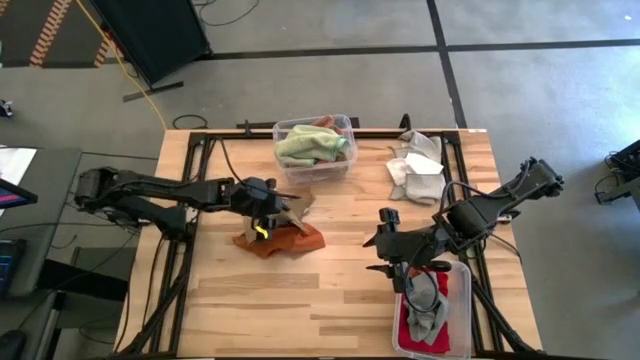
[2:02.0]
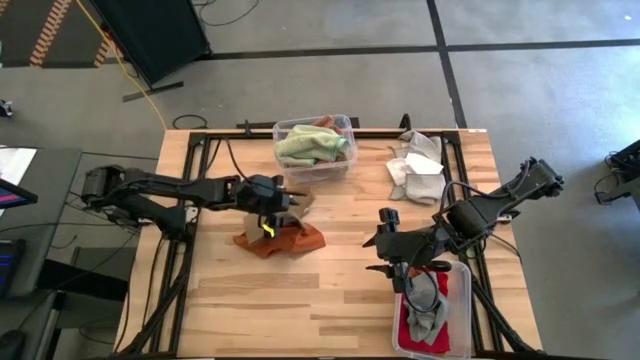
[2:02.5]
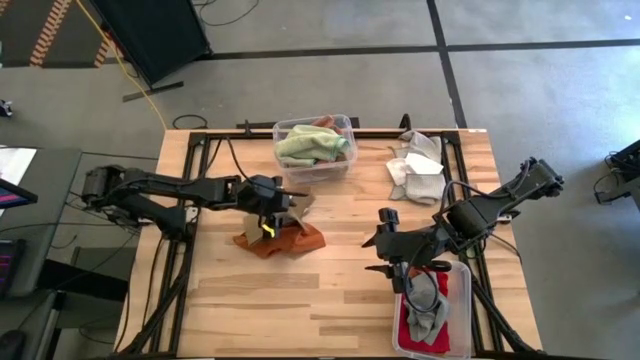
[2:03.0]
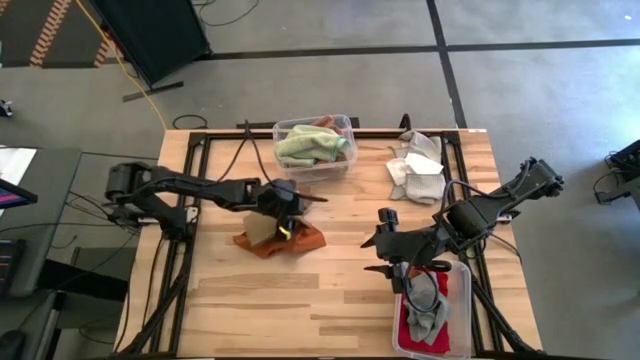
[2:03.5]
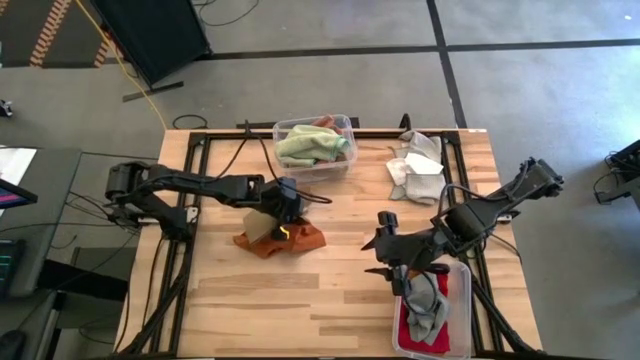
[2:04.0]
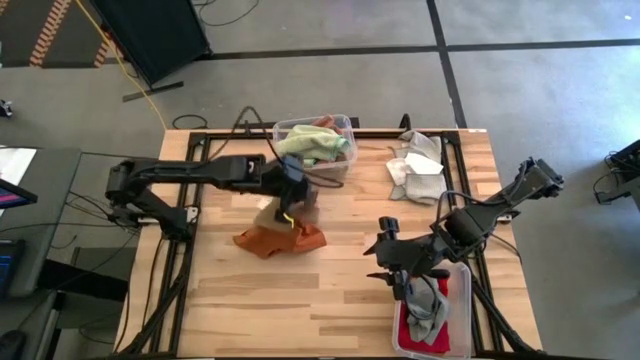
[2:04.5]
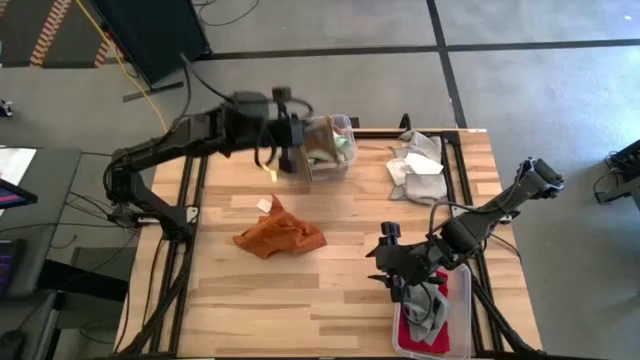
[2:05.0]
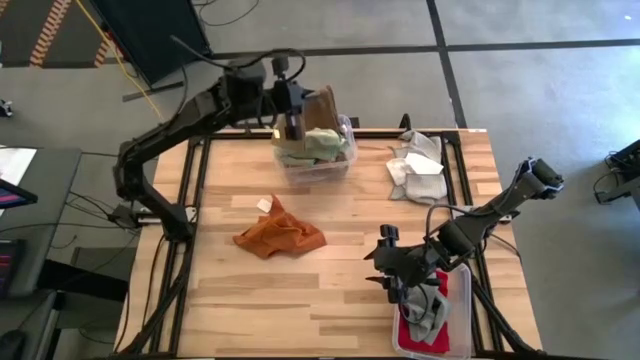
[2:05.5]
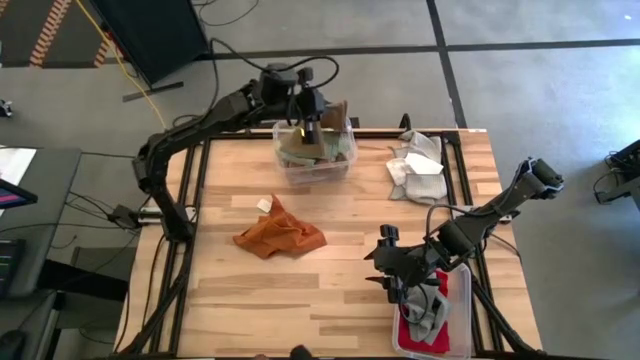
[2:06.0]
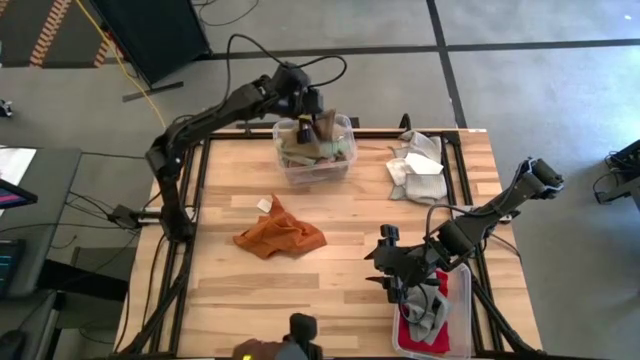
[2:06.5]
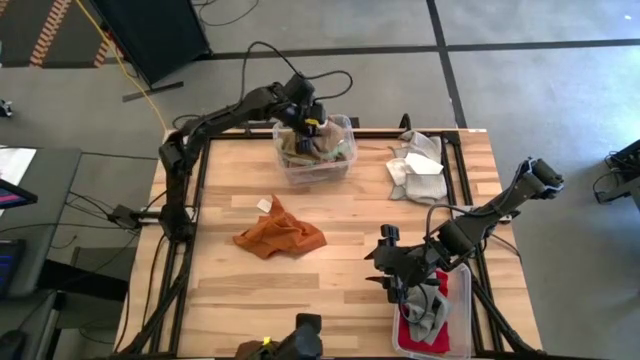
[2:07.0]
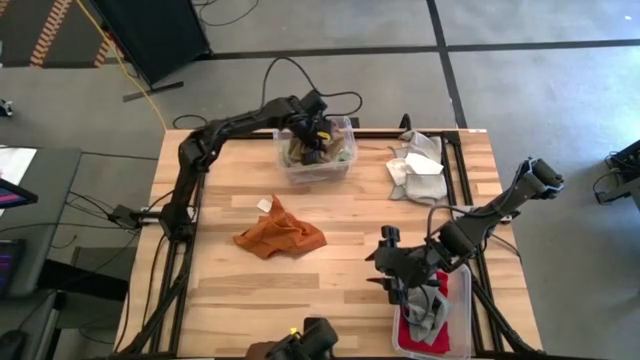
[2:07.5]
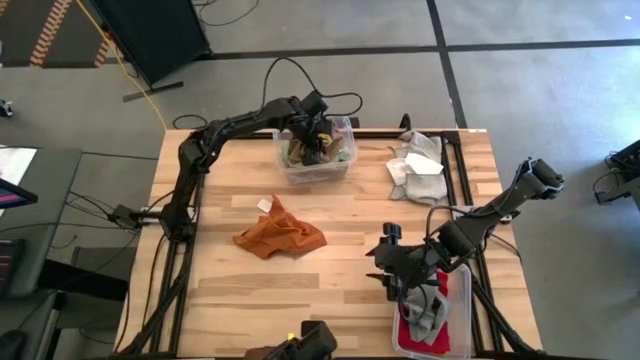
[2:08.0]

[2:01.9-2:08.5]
Task: Sort towels by color in basket
Put the brown towel into the top transparent bin

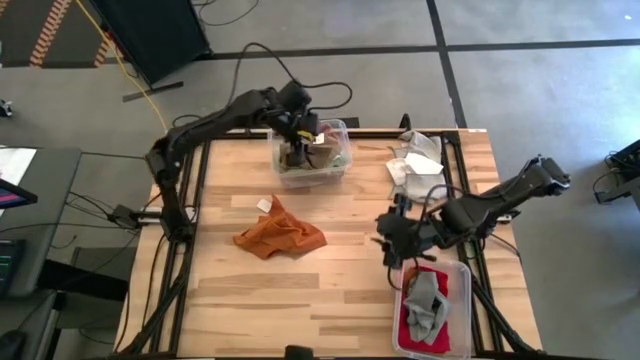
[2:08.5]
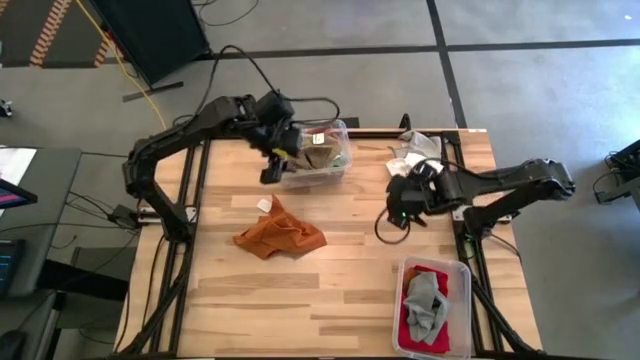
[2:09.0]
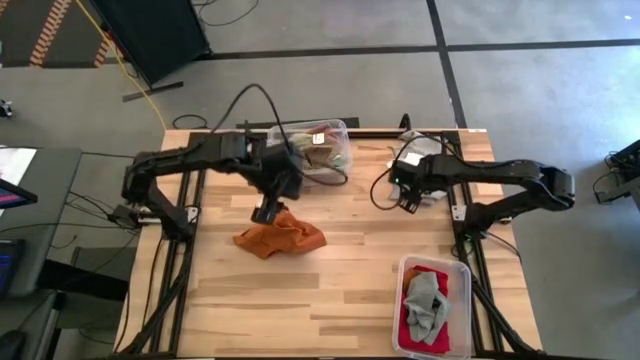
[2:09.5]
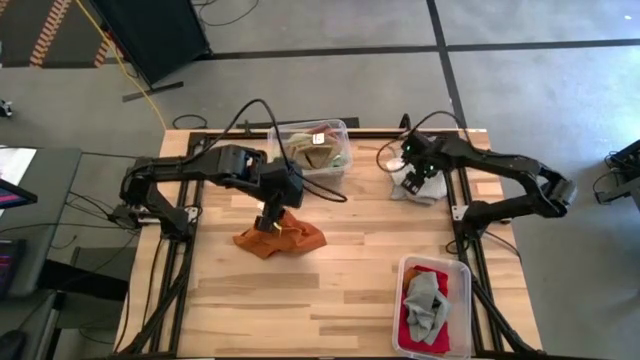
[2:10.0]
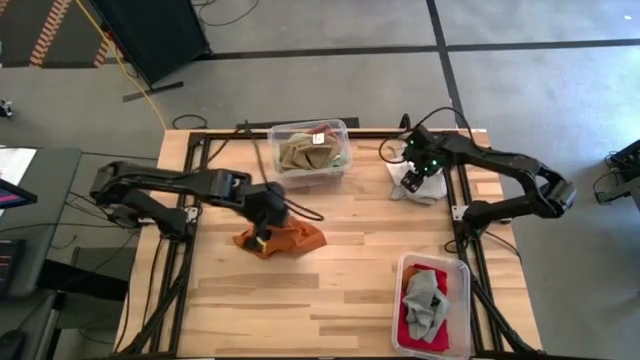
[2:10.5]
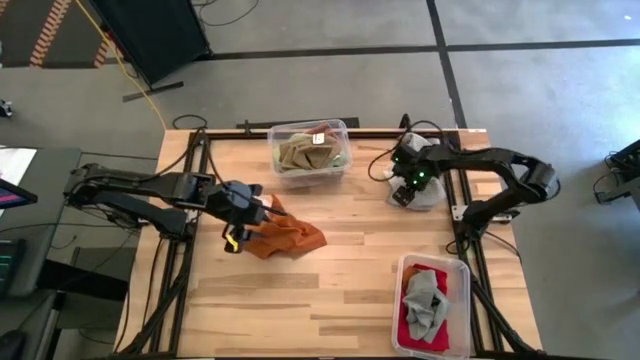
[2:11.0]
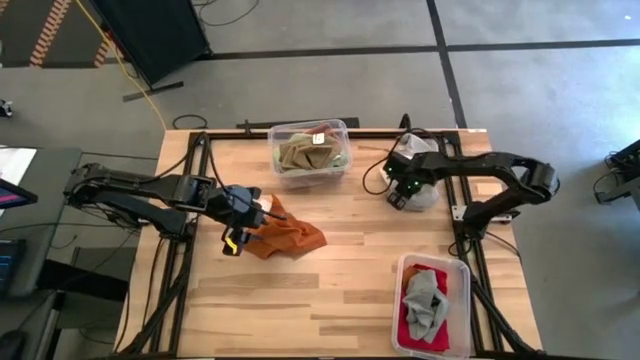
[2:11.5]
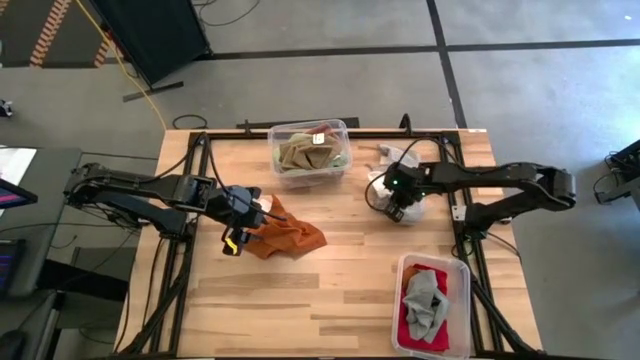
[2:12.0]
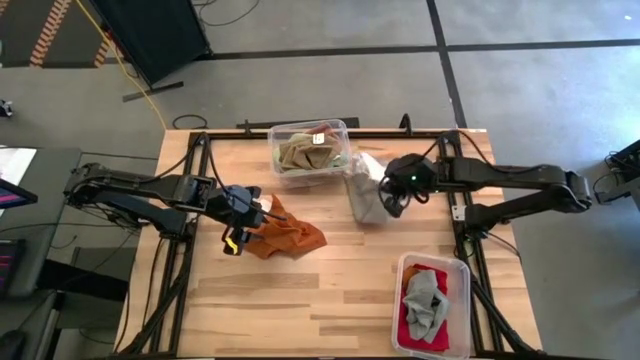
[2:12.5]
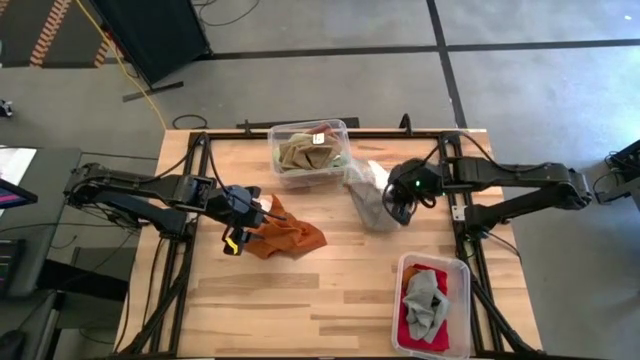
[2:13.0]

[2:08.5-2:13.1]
Put the white towel into the top transparent bin

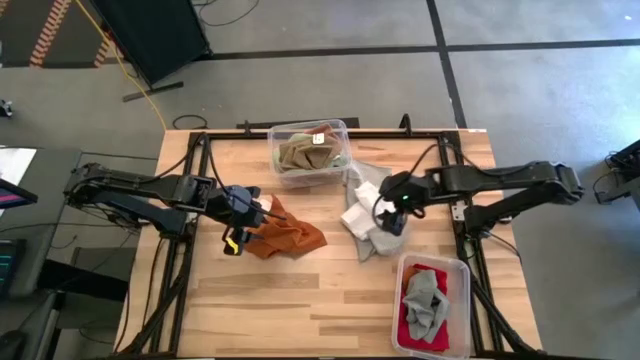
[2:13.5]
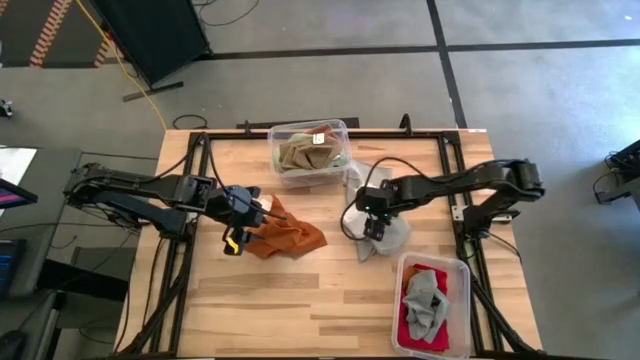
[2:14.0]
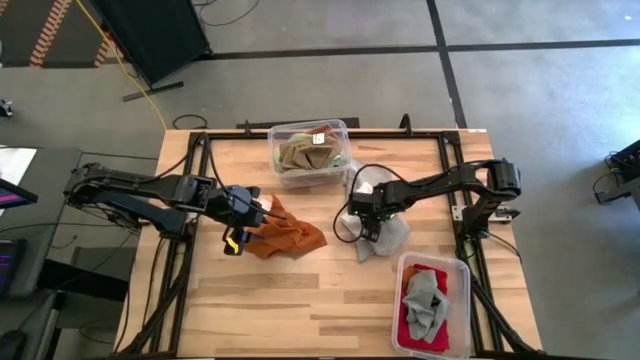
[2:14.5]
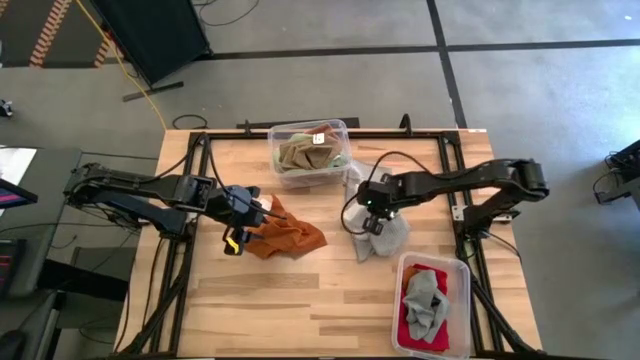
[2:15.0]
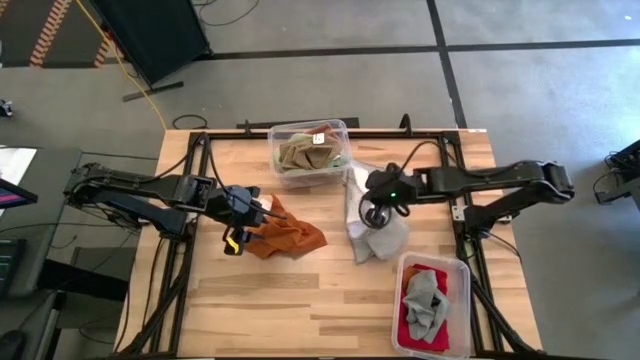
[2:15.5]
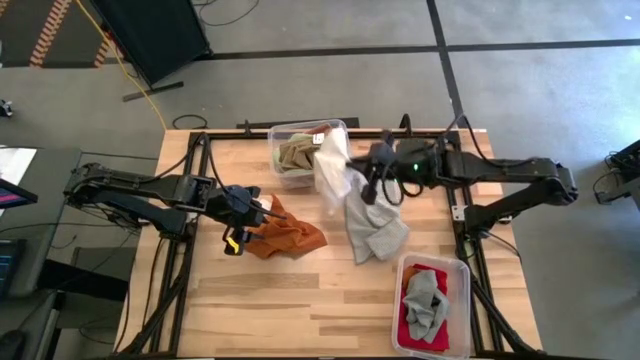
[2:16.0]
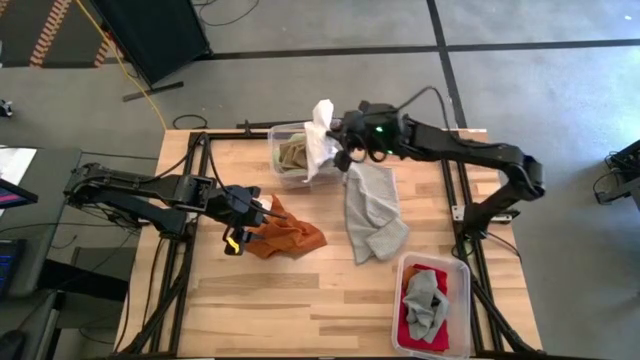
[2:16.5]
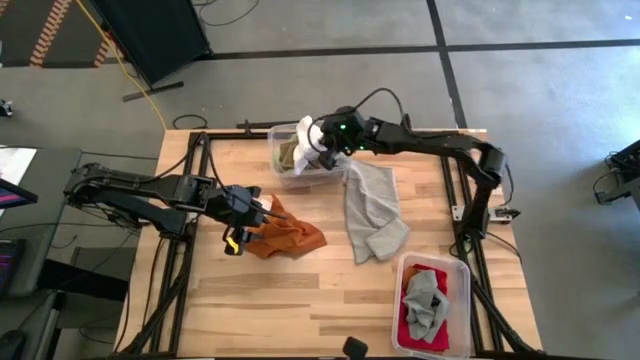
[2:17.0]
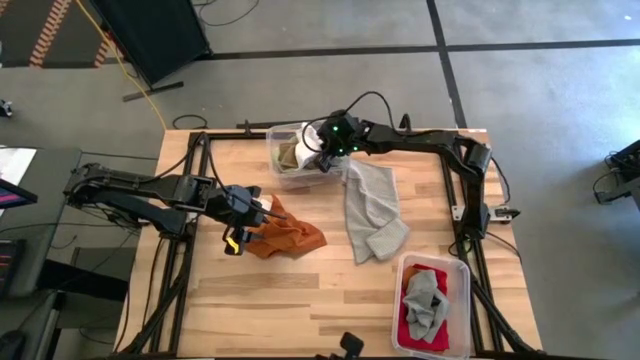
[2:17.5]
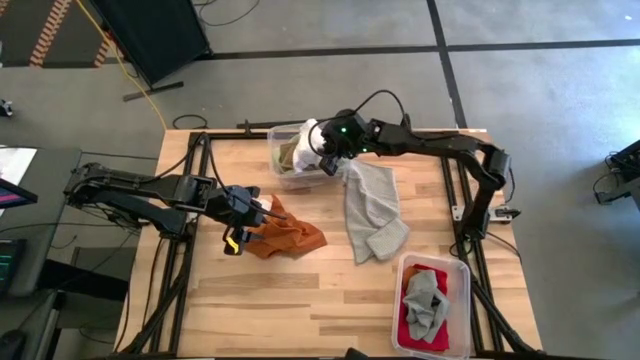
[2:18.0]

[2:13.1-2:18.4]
Put the white towel into the top transparent bin

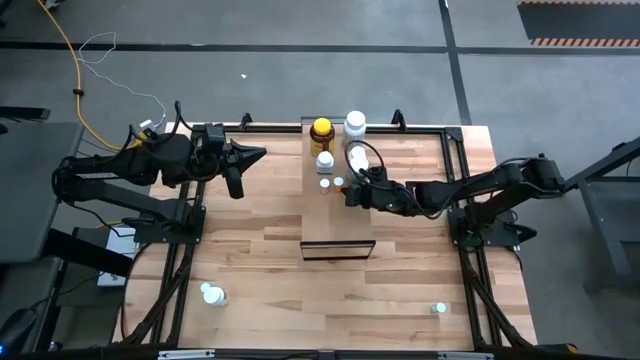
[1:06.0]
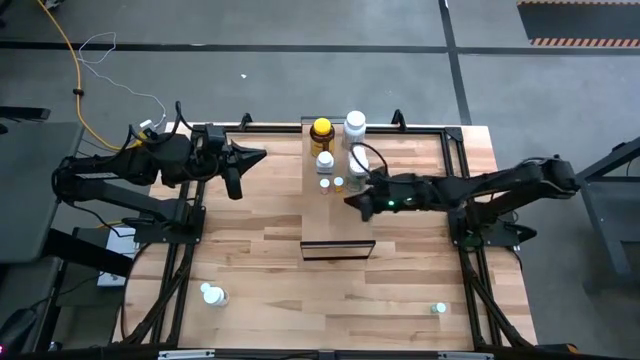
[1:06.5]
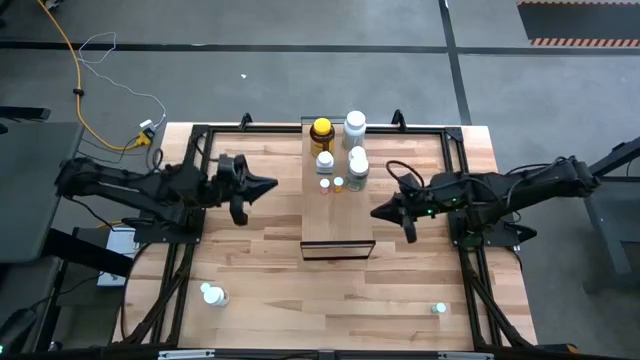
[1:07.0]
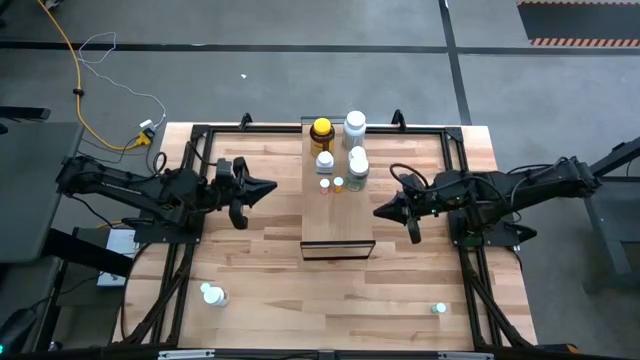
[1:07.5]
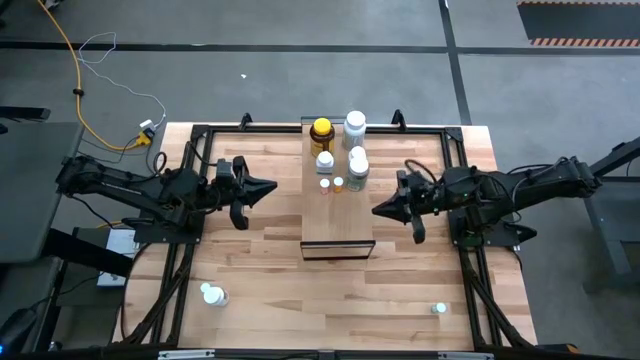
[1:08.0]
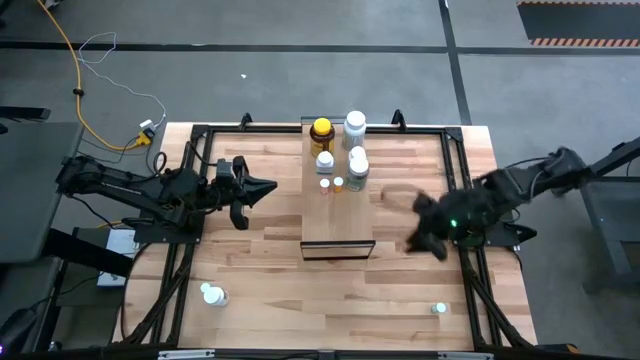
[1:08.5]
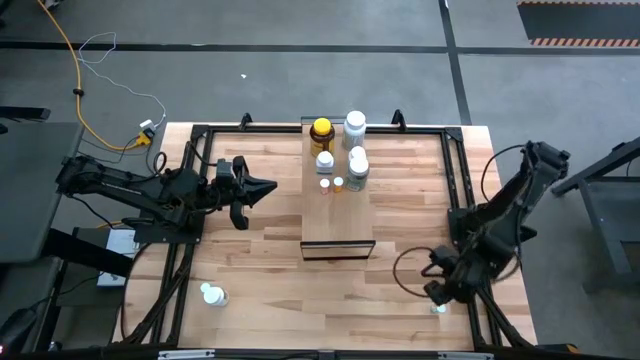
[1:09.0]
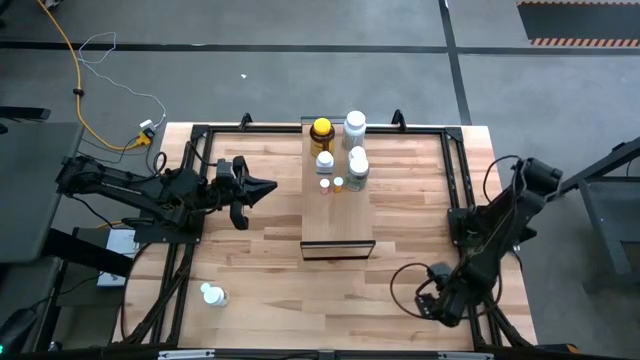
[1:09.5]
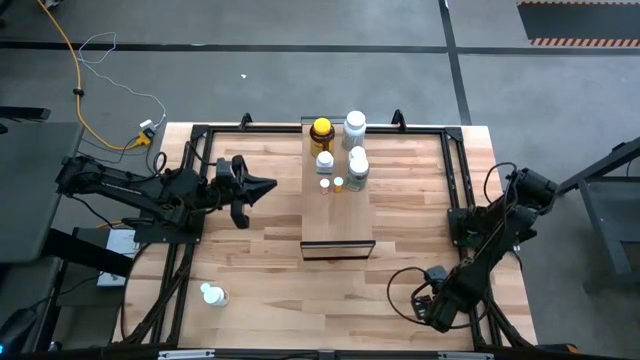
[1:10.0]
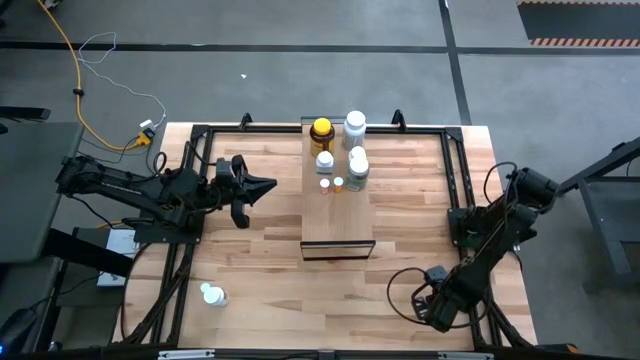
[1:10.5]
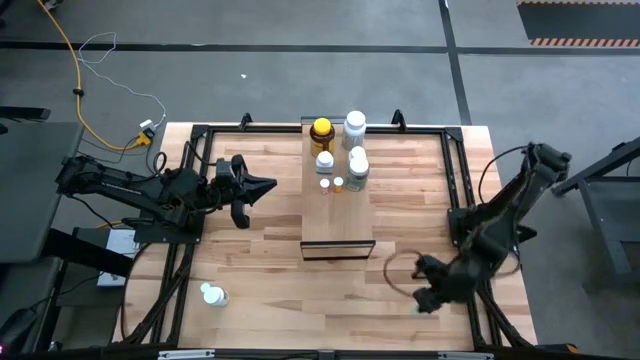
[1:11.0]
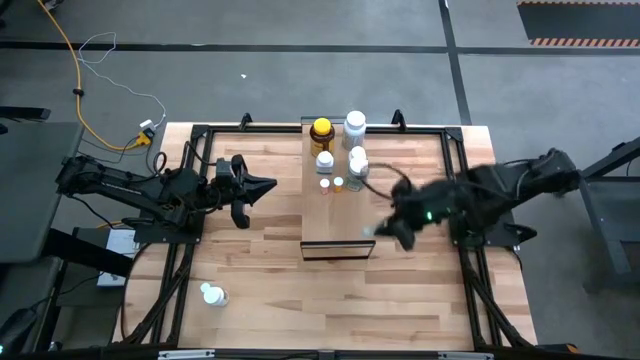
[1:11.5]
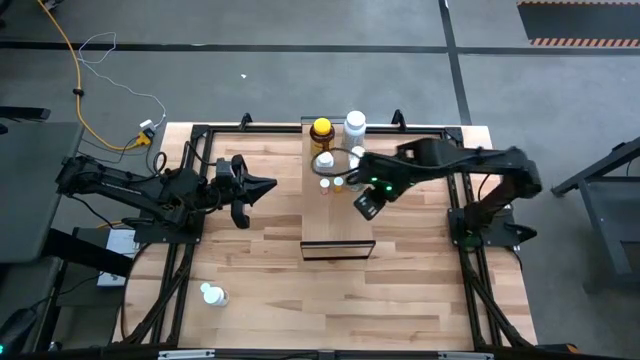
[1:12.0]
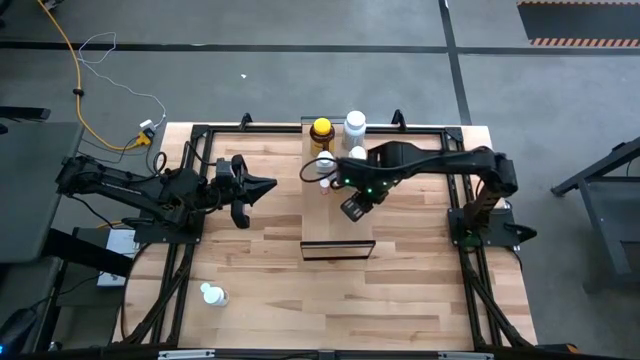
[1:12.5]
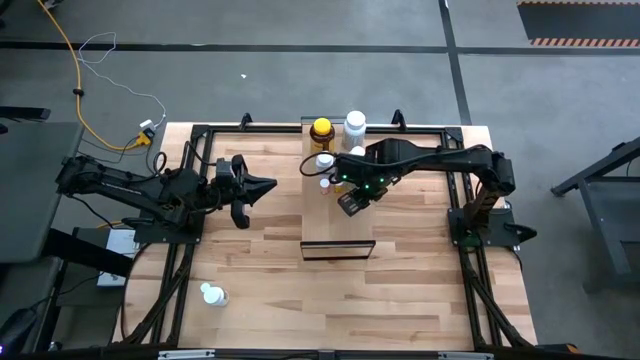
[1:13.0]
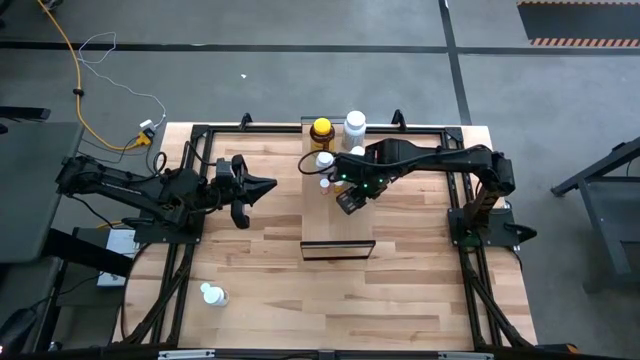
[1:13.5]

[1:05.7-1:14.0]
Task: Pick and place medicine bottles onto shelf by color
Put the right light green pill bottle on the shelf
